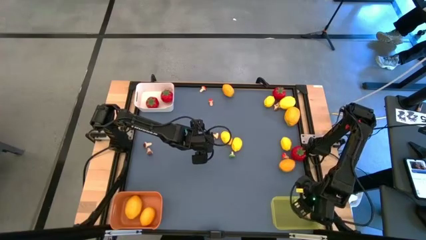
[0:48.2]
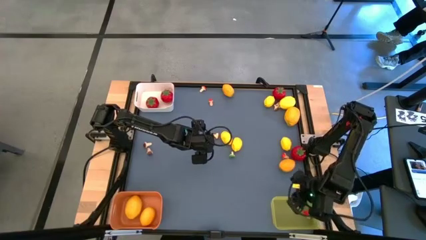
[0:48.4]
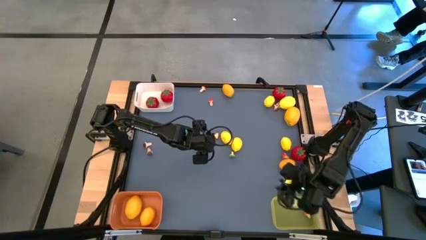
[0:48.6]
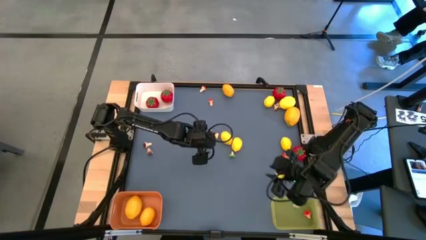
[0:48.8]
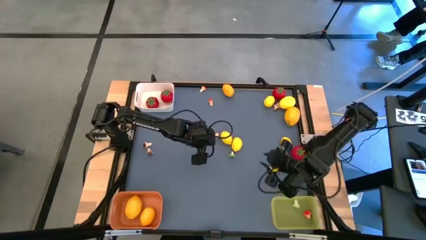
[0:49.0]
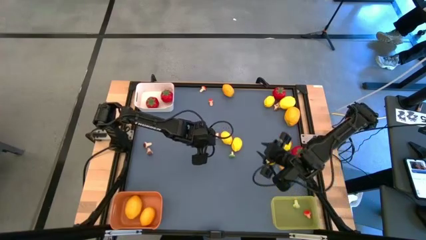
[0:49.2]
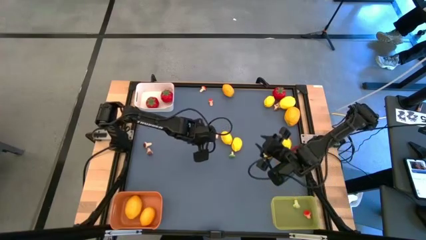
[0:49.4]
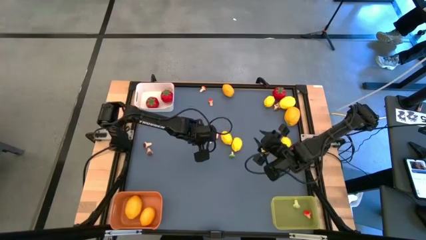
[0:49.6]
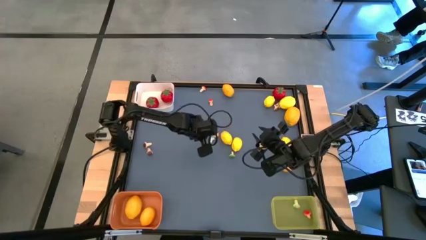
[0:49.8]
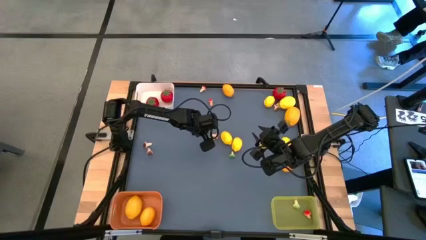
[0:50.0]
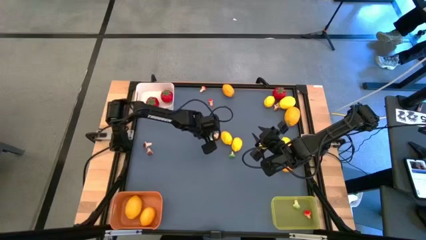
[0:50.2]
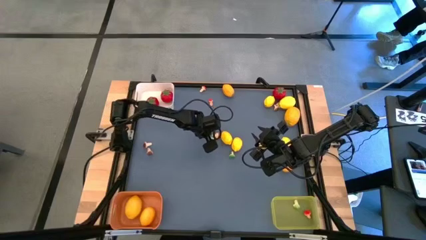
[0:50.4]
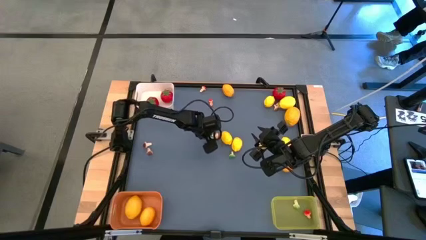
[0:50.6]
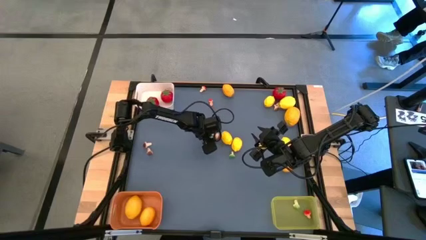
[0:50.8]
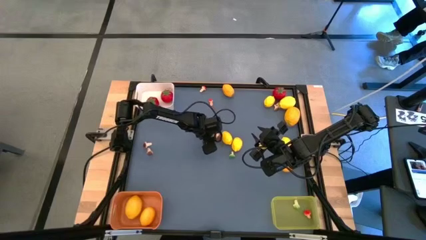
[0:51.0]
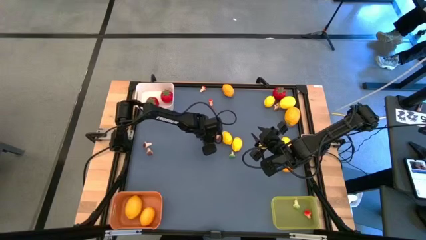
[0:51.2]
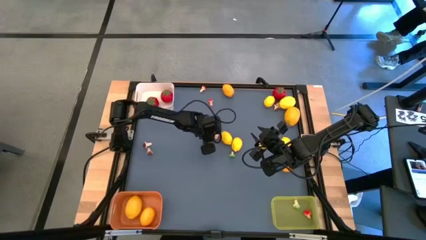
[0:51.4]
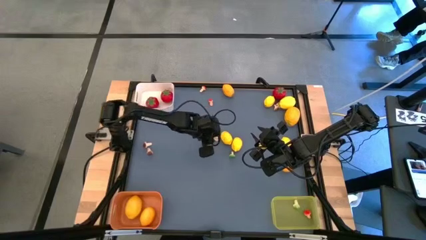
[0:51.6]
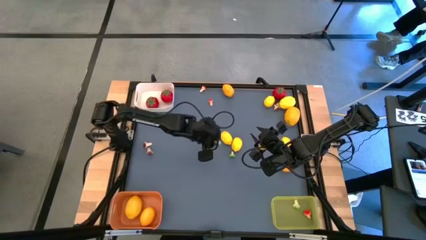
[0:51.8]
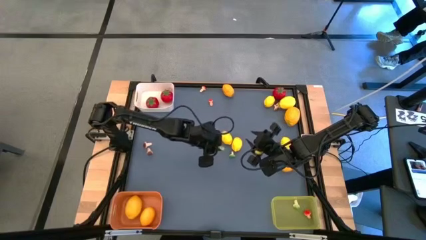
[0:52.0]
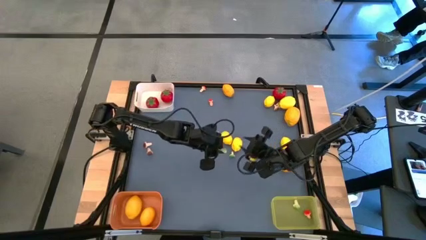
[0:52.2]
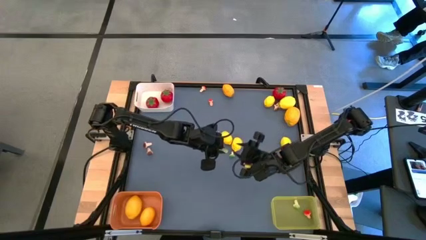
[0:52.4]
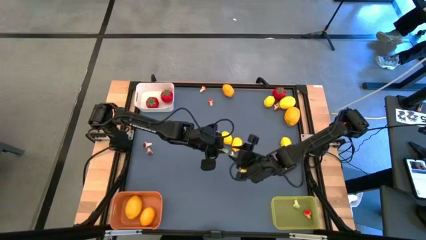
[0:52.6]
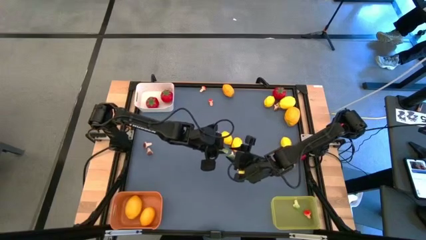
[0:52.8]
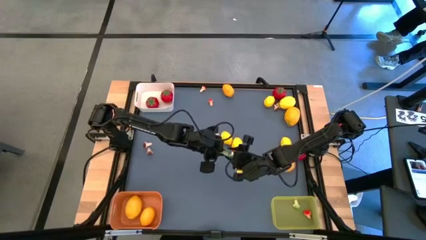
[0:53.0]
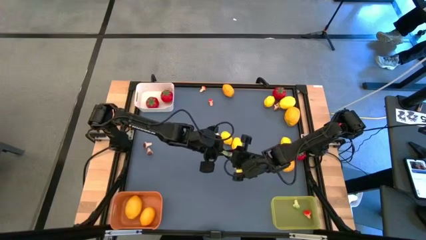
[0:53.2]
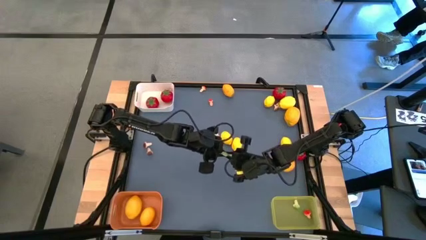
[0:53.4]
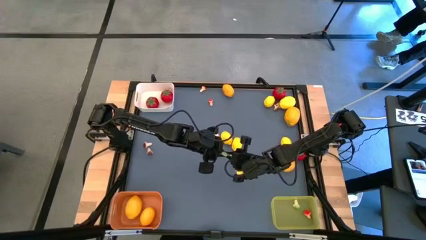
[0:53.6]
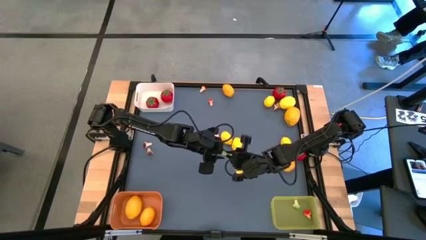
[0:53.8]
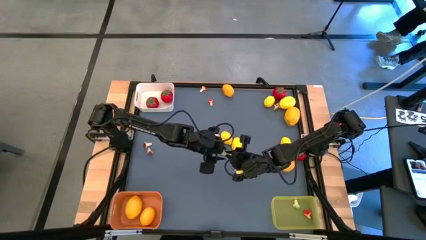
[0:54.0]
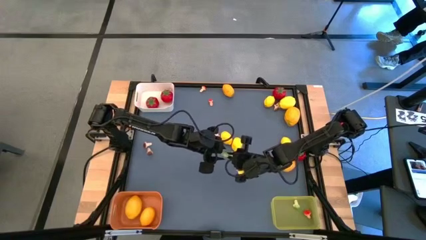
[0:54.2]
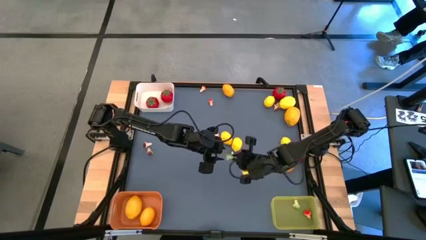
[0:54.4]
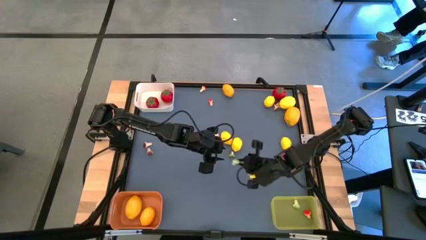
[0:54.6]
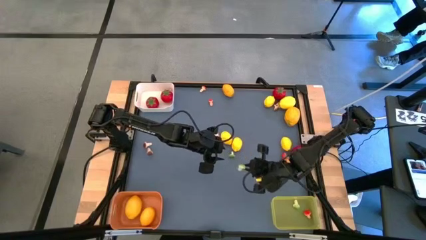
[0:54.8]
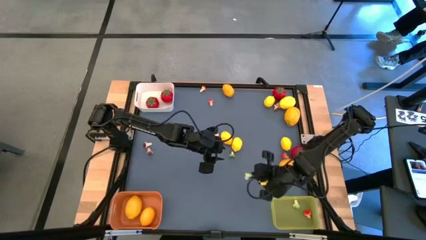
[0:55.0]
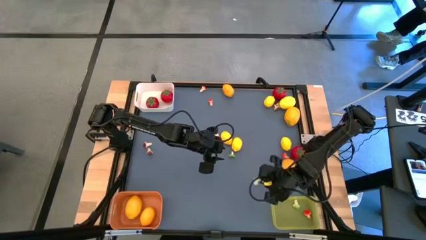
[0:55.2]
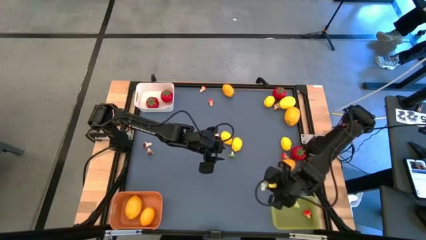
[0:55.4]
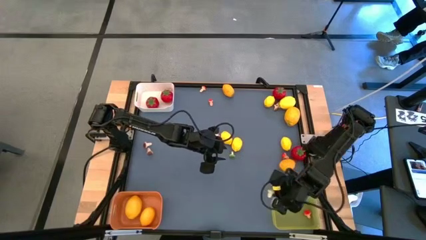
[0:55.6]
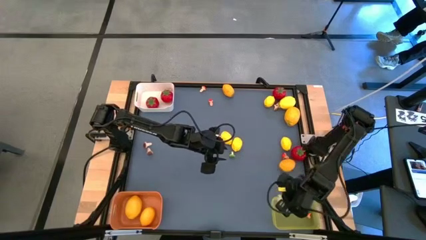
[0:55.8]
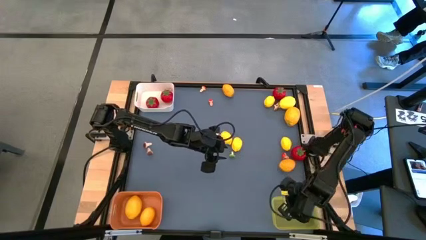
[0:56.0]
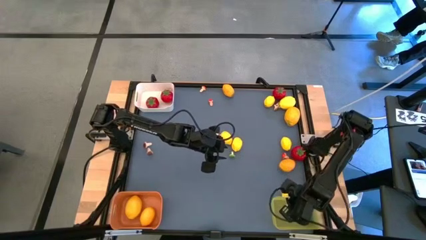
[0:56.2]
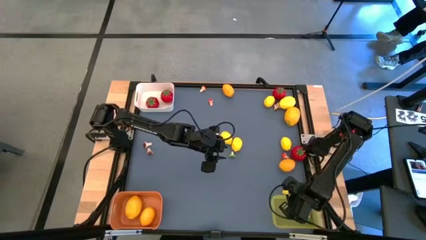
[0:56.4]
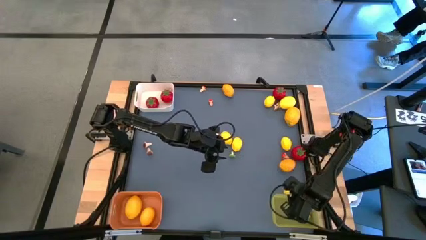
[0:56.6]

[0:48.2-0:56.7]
Task: Sort produce into baskets
Put the green mushroom into the yellow bin

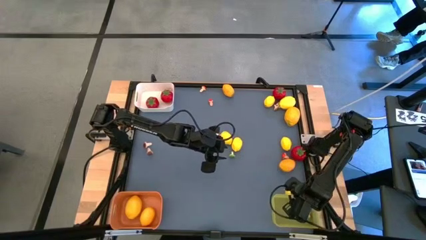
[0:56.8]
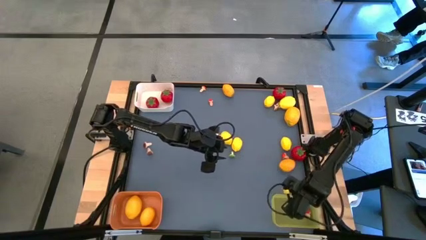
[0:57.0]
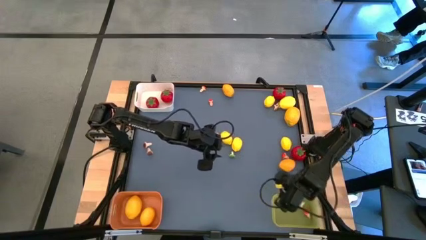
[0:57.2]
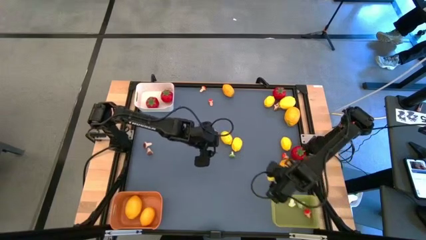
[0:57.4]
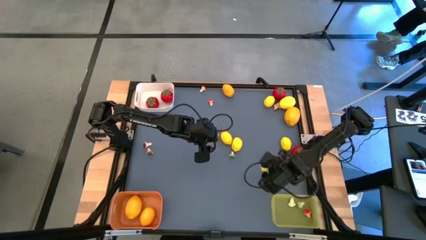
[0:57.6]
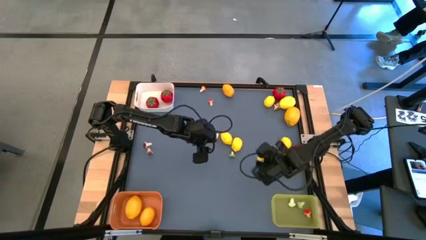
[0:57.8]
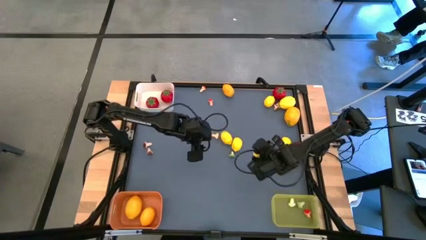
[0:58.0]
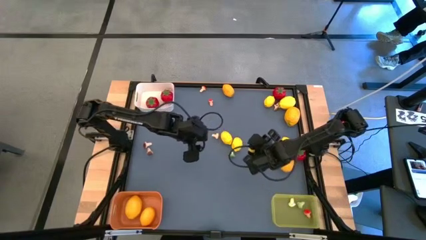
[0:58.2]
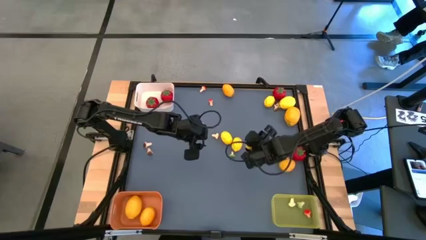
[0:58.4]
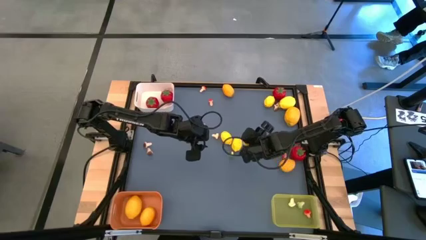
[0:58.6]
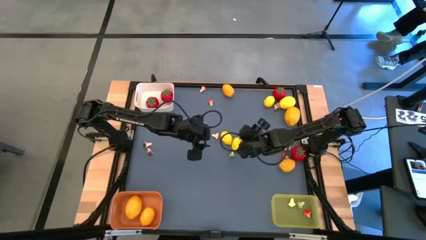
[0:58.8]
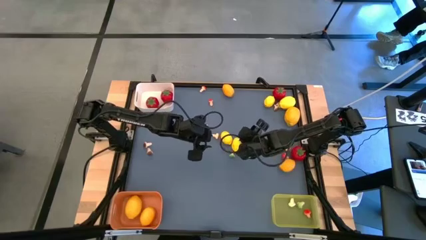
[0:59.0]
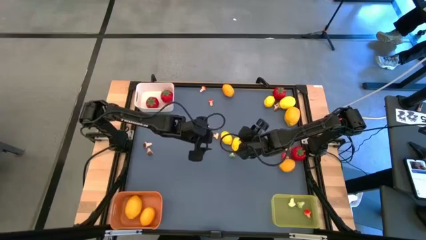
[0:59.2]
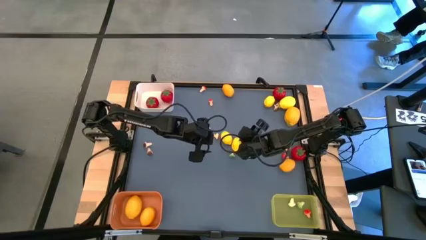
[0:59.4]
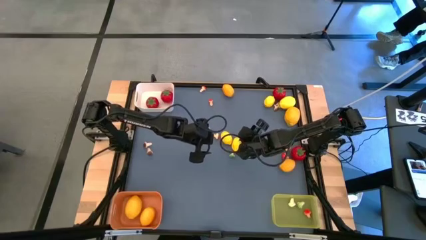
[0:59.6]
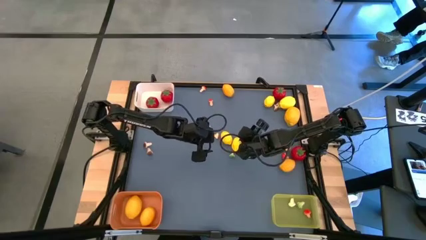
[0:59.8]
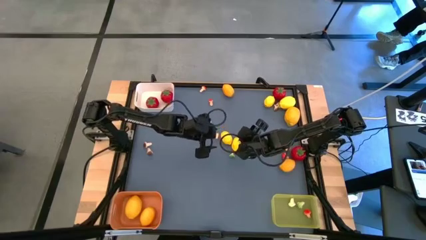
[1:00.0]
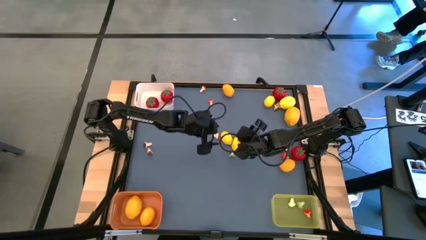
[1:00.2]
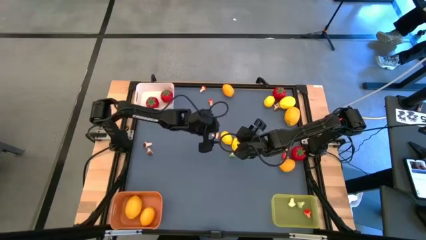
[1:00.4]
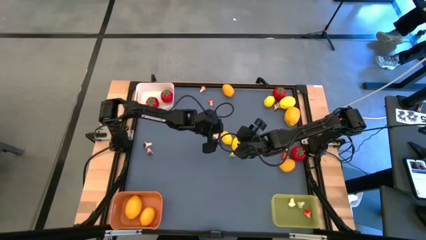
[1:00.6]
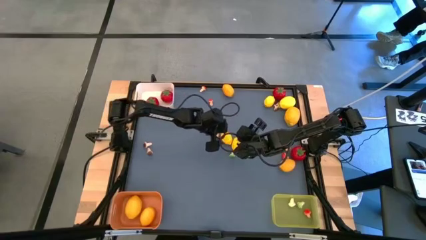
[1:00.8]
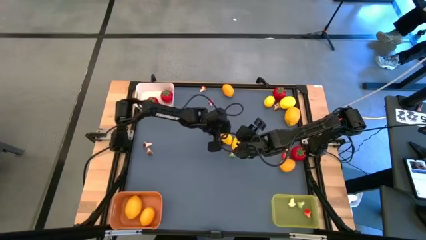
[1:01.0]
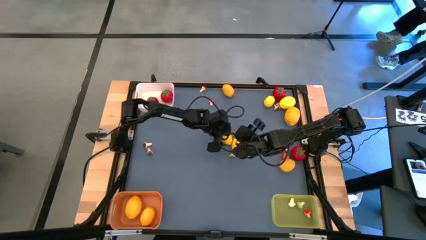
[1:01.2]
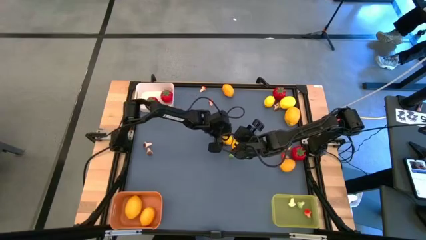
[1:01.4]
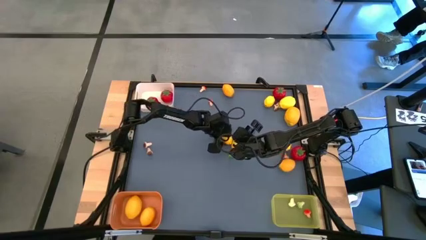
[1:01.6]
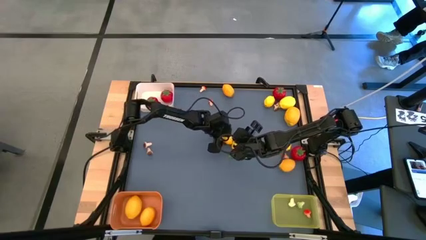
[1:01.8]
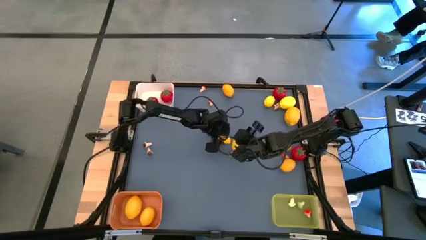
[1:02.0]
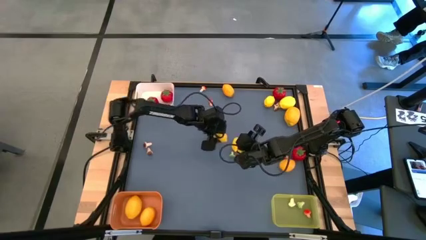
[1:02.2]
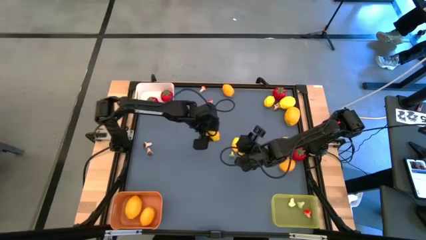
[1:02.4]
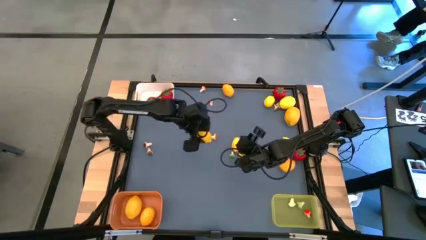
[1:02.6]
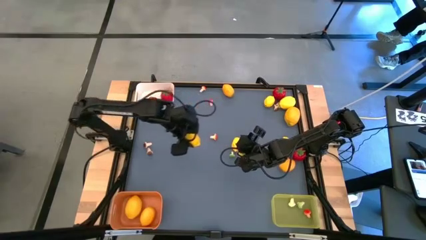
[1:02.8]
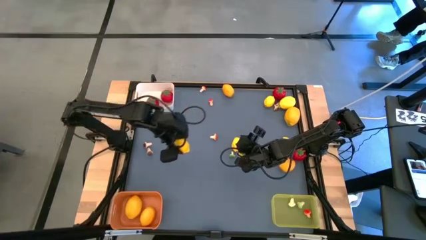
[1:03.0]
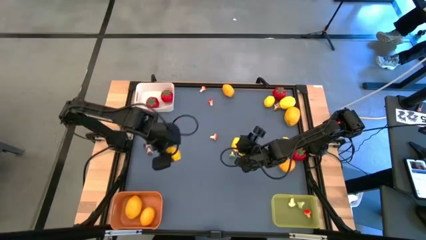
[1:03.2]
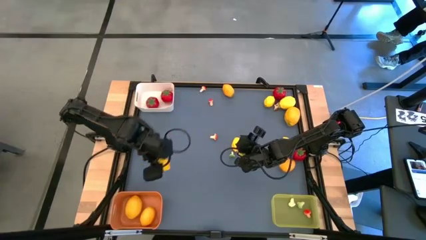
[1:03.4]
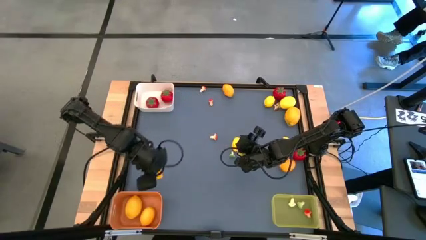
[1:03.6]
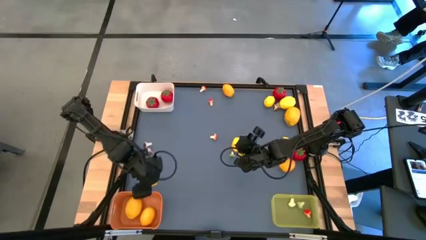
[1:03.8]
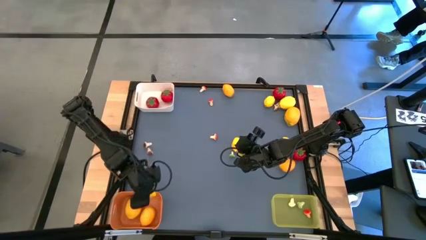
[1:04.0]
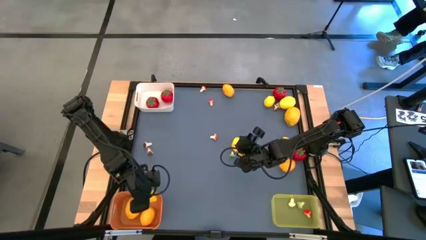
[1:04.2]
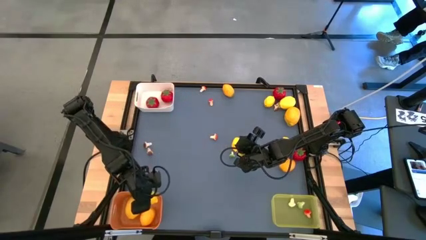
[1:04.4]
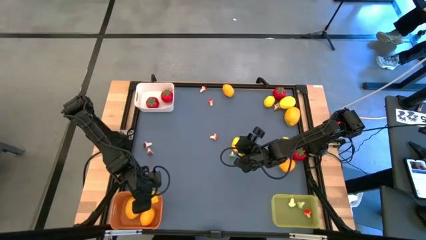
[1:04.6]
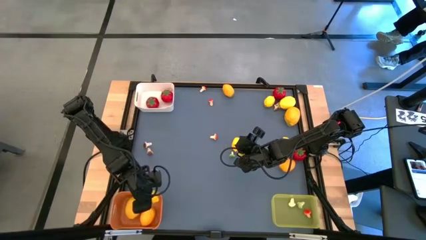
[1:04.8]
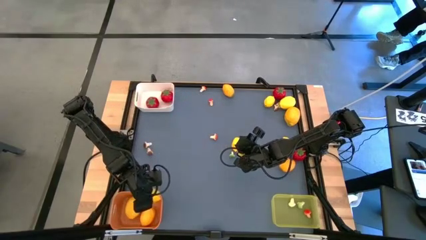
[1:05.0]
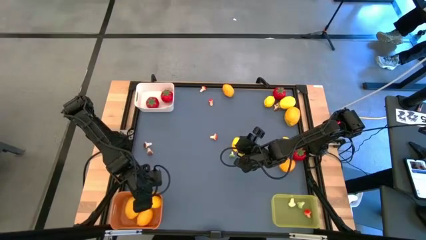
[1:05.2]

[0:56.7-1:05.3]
Put the yellow lemon into the orange bin
